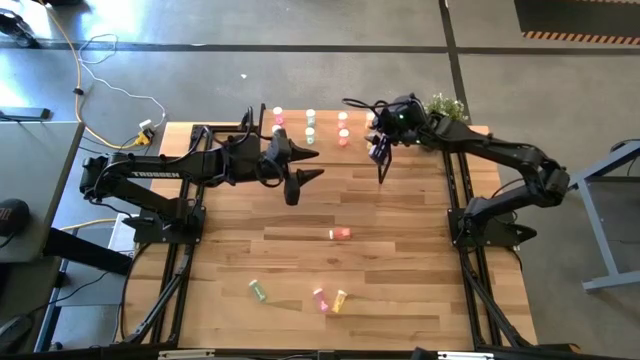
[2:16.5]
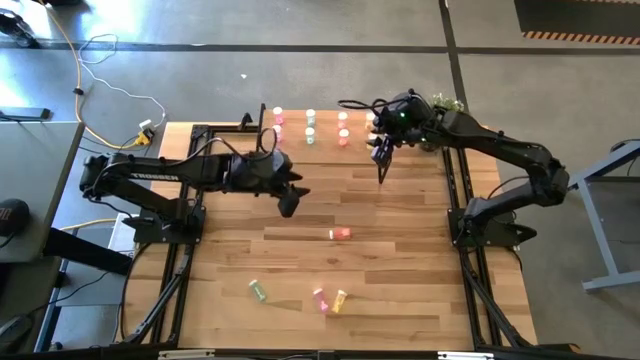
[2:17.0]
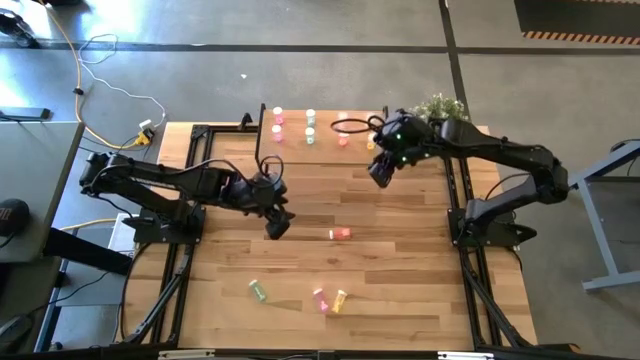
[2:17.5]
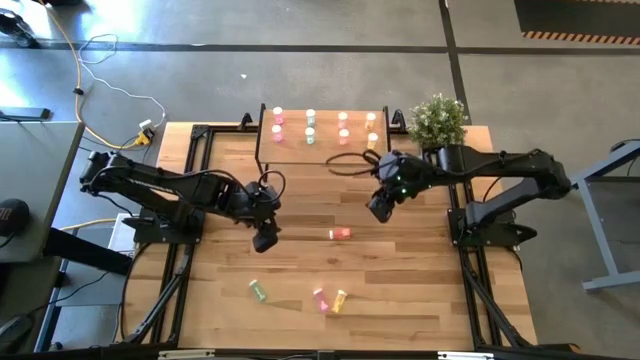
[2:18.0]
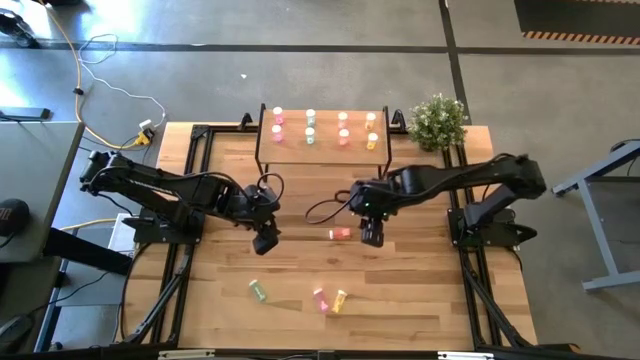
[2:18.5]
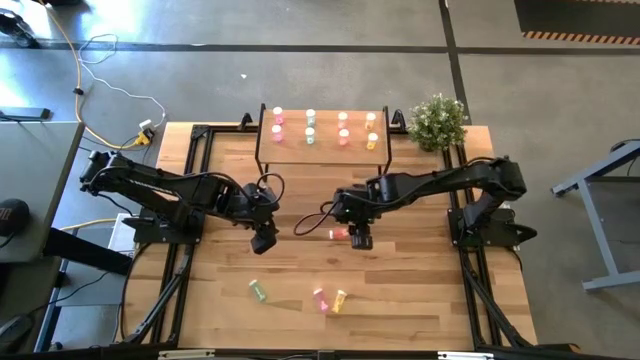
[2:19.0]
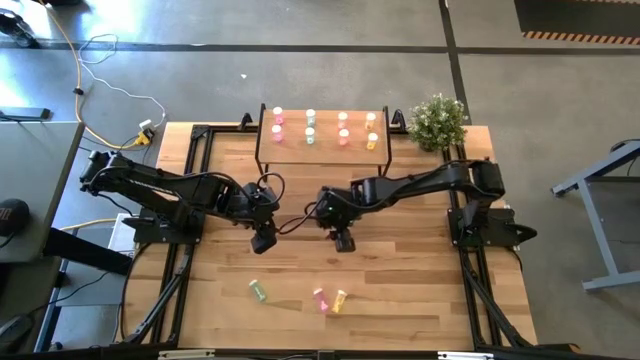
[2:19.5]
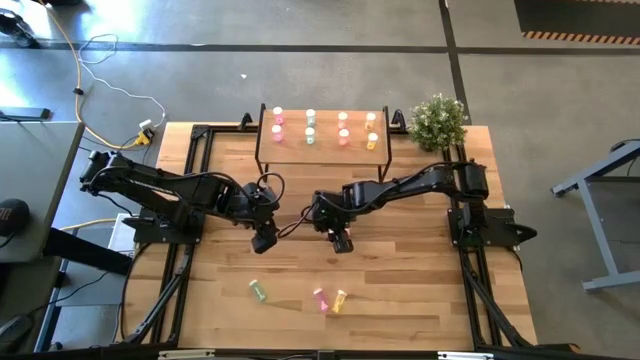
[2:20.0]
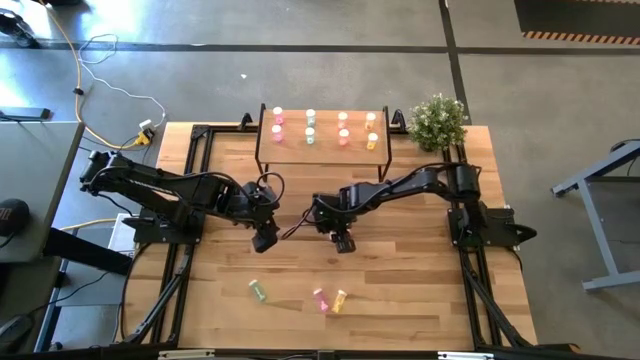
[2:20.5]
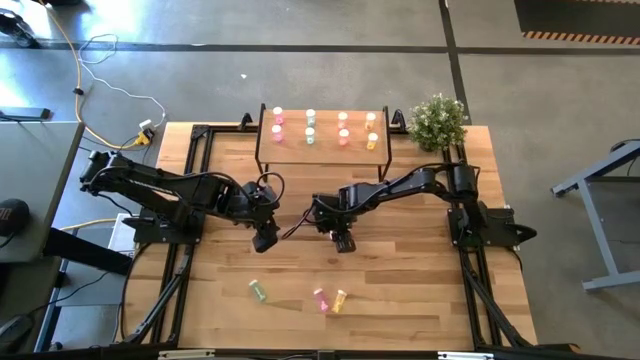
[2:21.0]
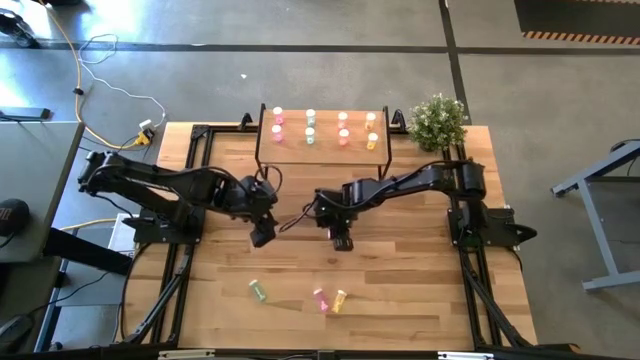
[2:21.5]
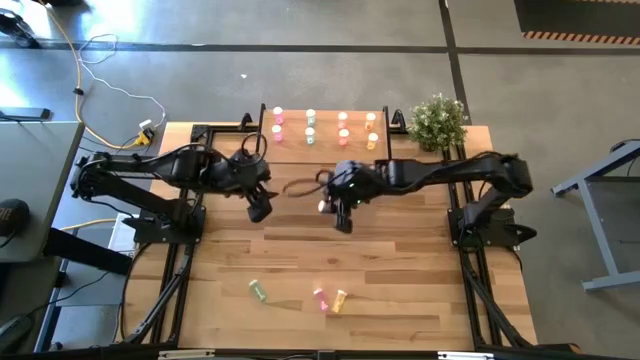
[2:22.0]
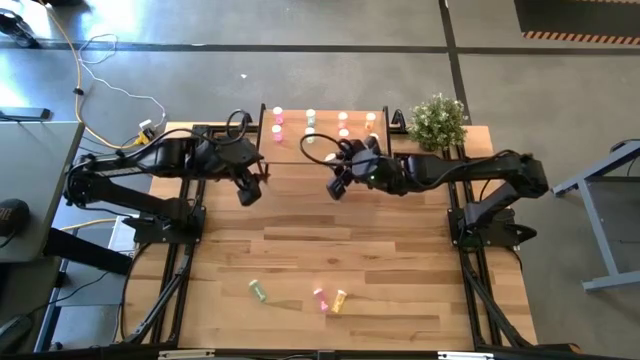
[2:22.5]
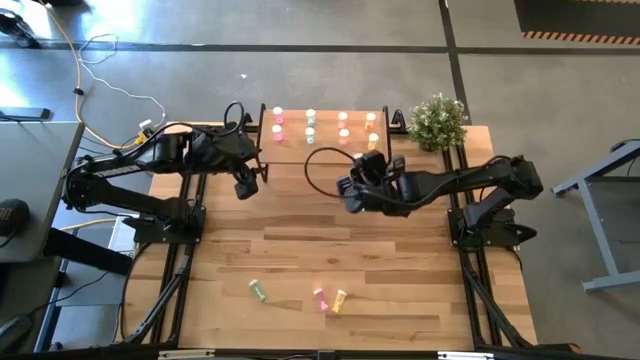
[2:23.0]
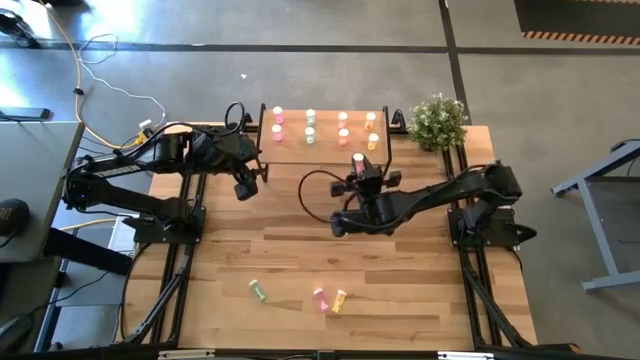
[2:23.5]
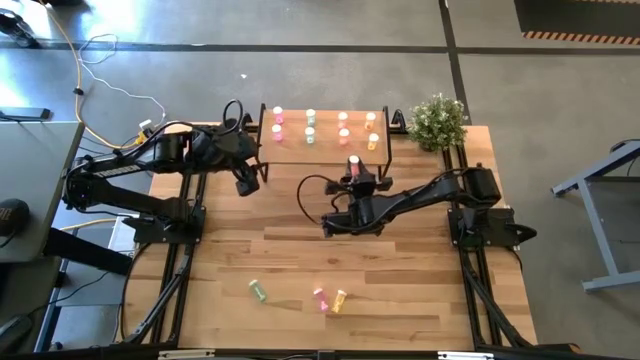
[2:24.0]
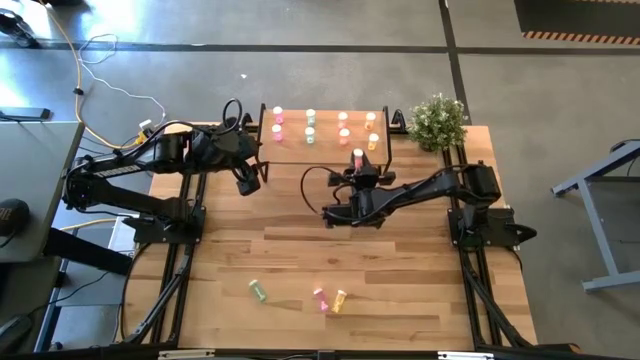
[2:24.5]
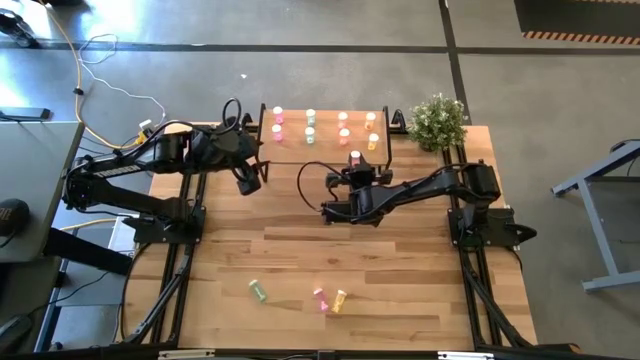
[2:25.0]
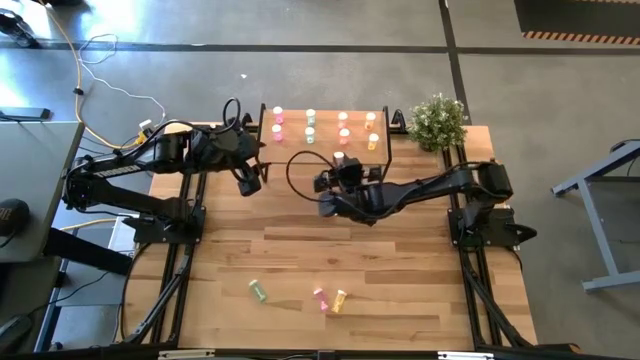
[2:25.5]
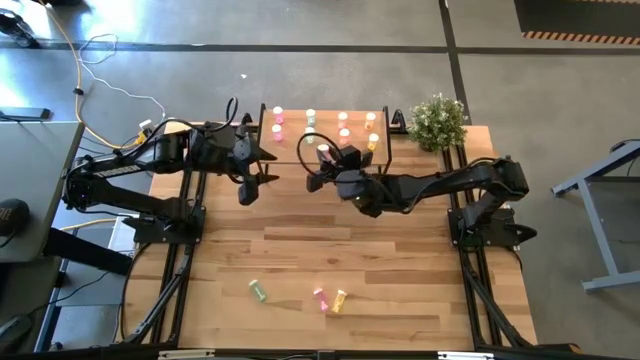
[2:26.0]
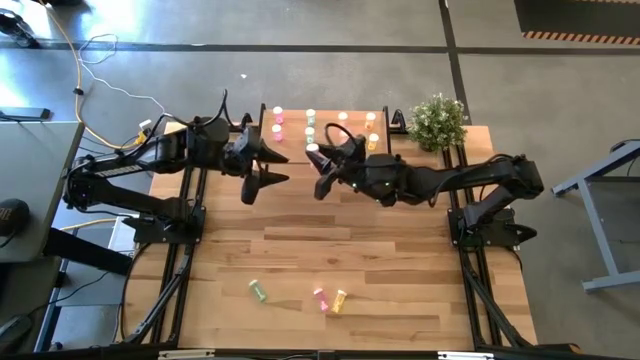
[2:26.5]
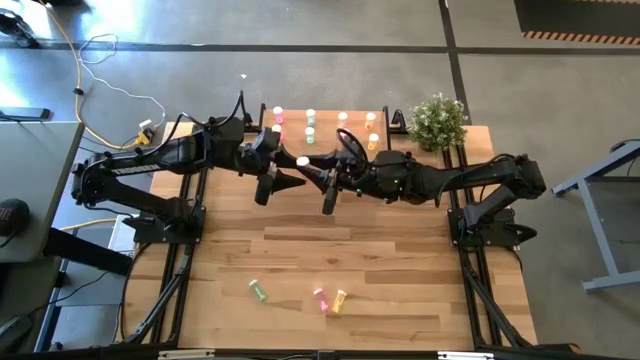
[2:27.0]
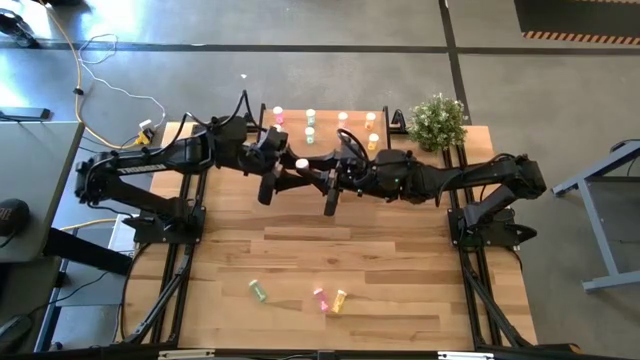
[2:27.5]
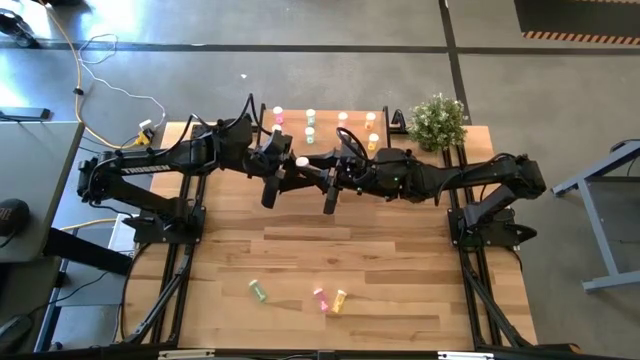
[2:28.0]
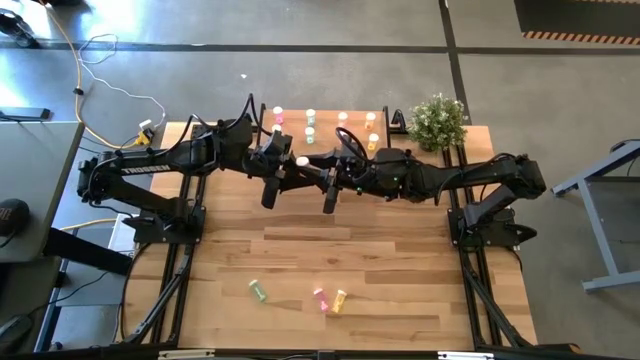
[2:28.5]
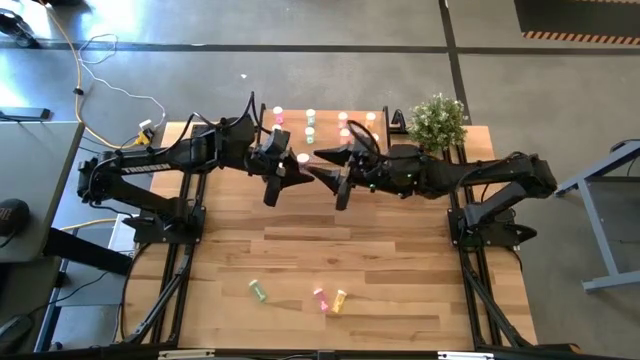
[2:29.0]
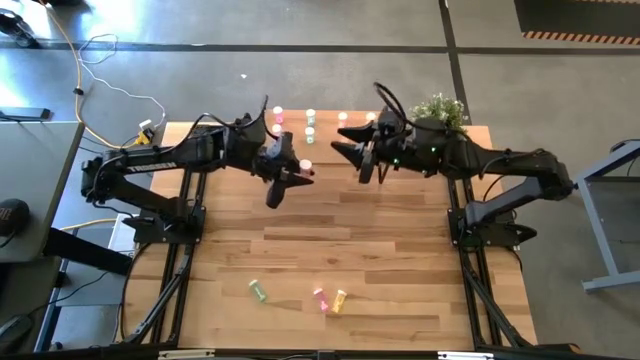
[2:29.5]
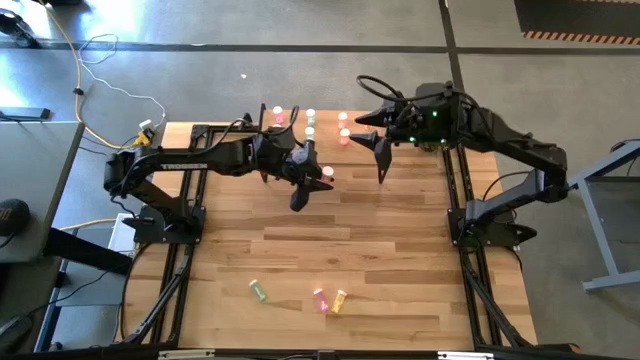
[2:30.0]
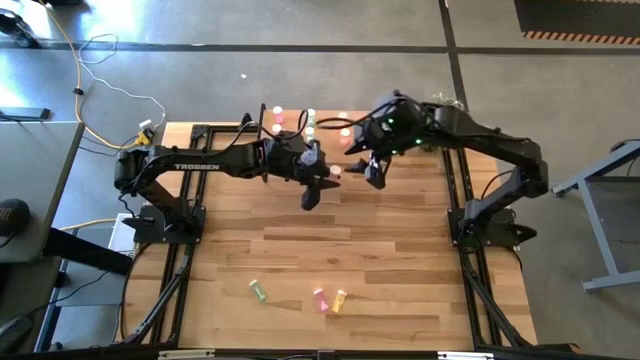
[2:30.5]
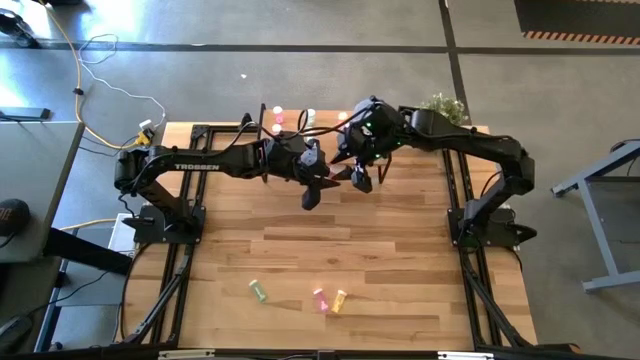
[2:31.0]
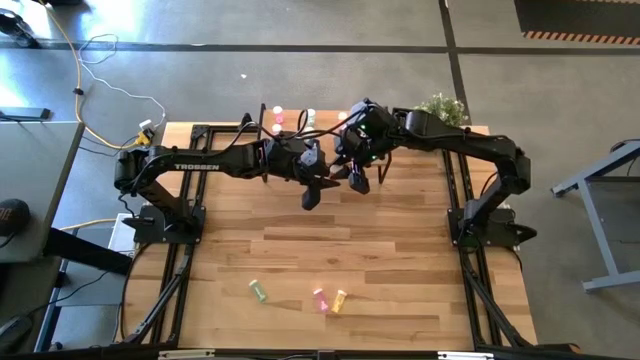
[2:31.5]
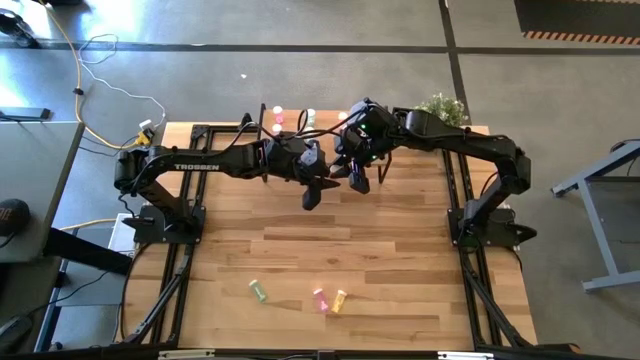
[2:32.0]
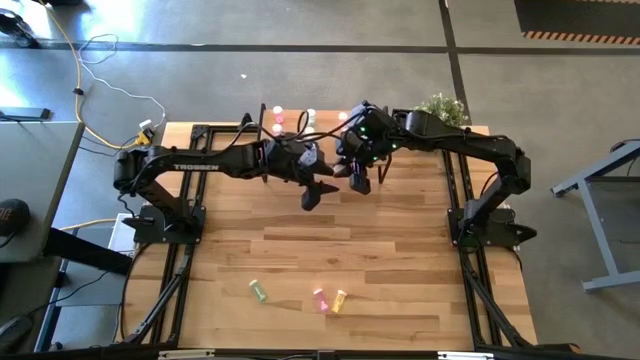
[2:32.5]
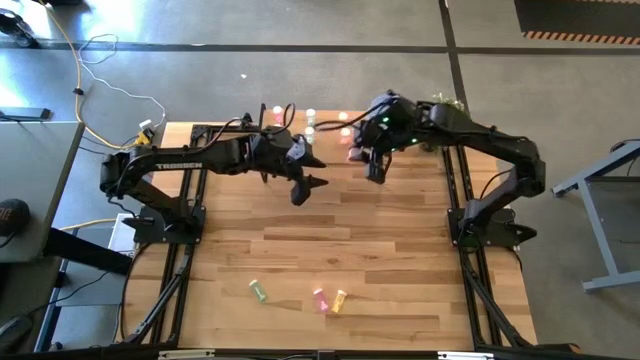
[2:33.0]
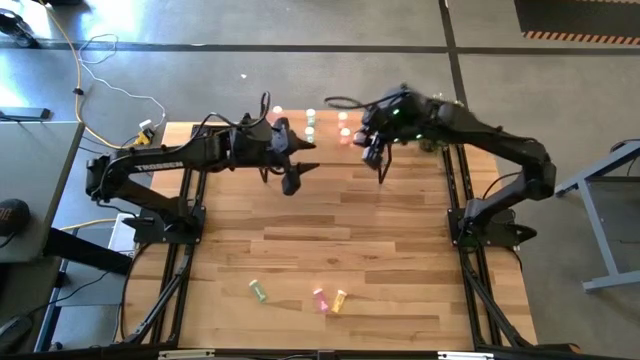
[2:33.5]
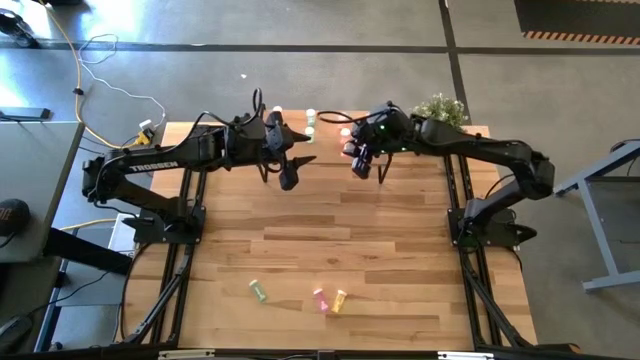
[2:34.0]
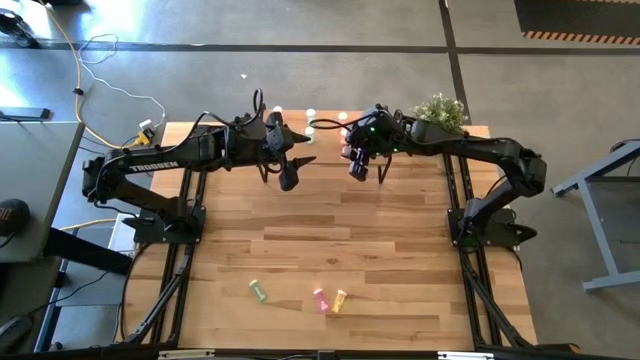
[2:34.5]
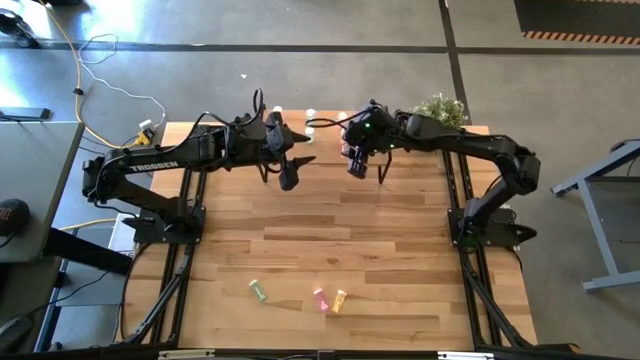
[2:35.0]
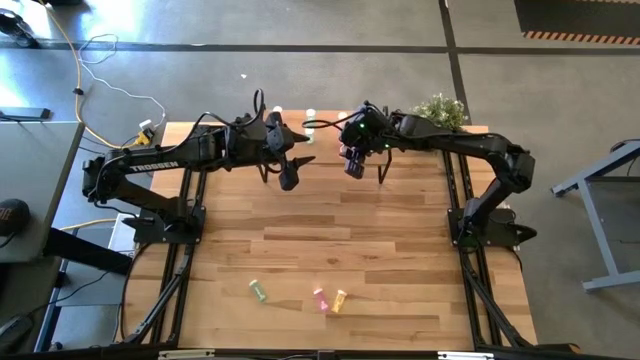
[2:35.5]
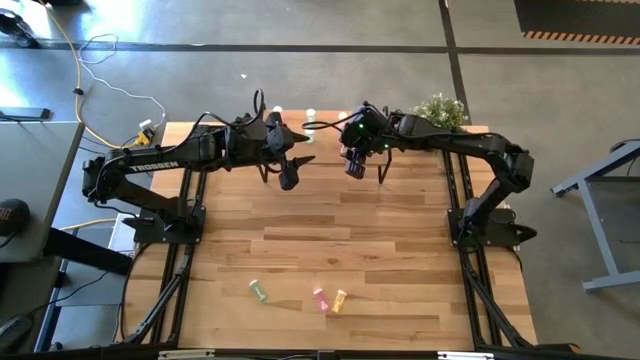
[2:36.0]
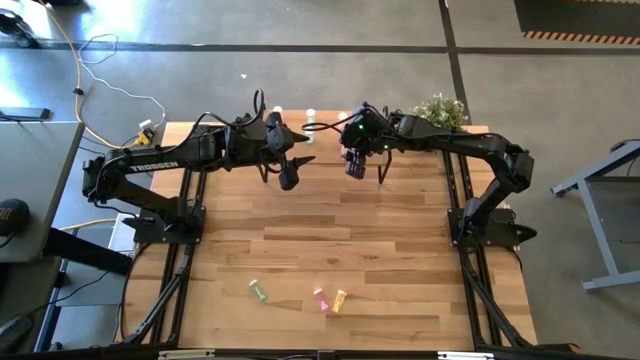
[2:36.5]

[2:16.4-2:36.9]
Task: Pick and place medicine bottles onto shelf by color
Put the orange pill bottle on the shelf aligned with the other orange pill bottles
